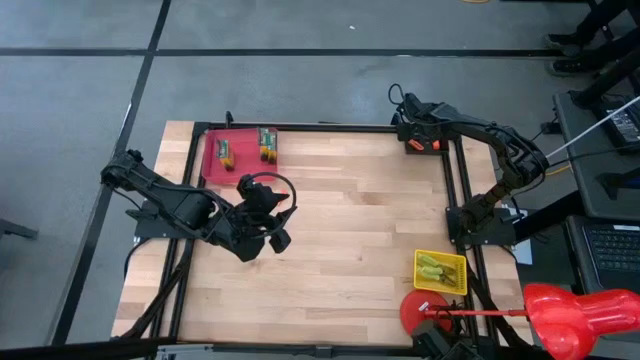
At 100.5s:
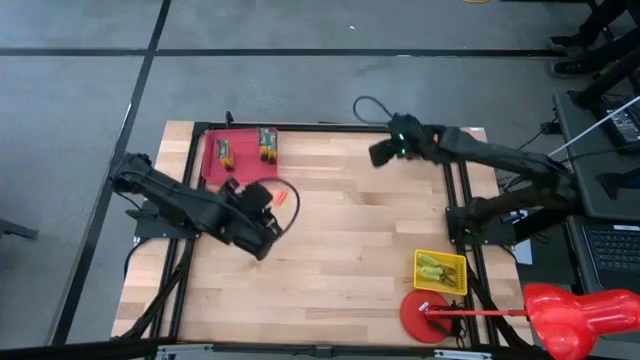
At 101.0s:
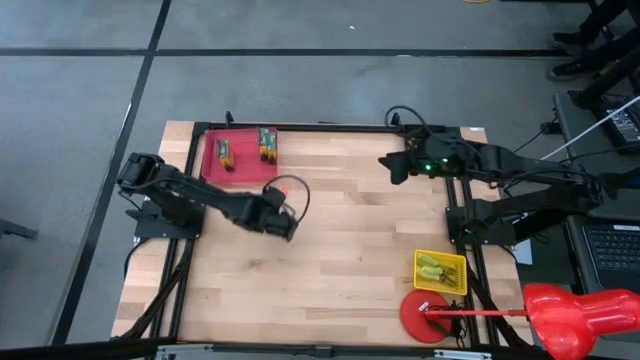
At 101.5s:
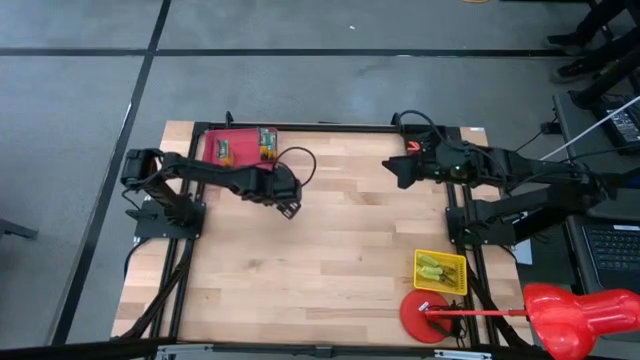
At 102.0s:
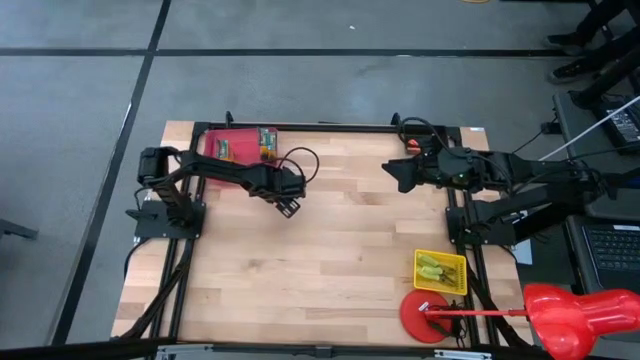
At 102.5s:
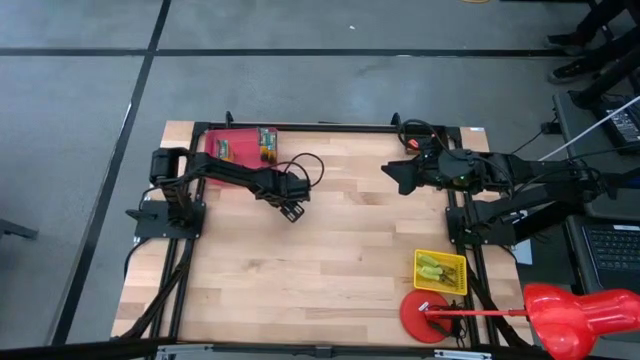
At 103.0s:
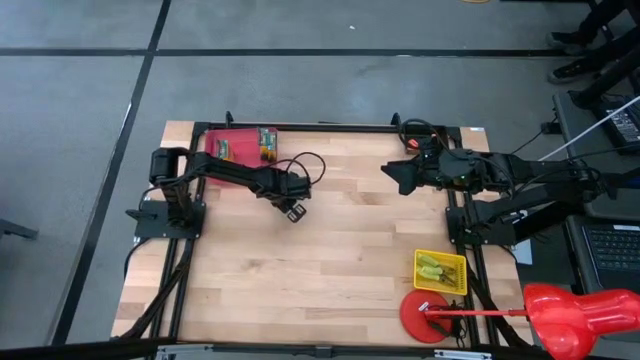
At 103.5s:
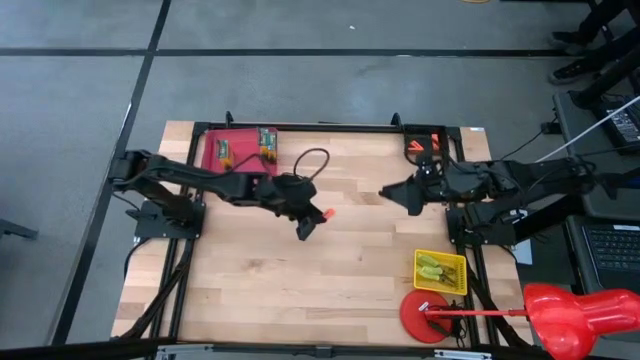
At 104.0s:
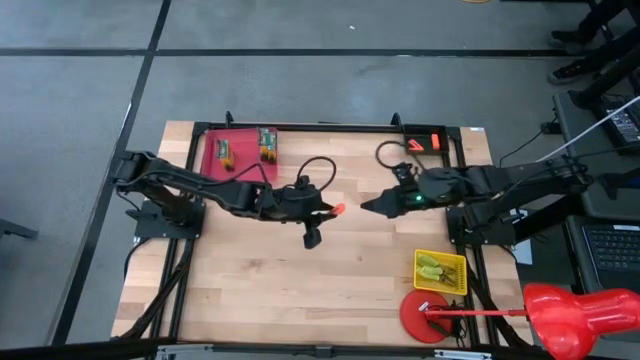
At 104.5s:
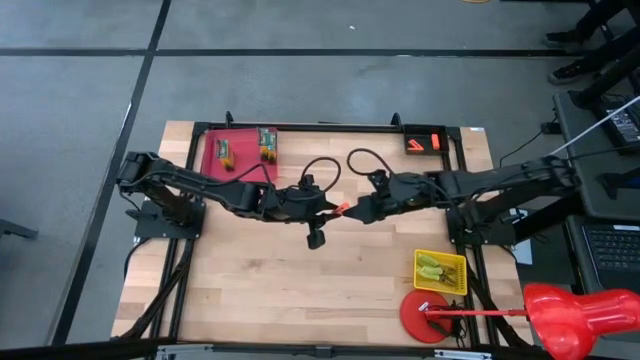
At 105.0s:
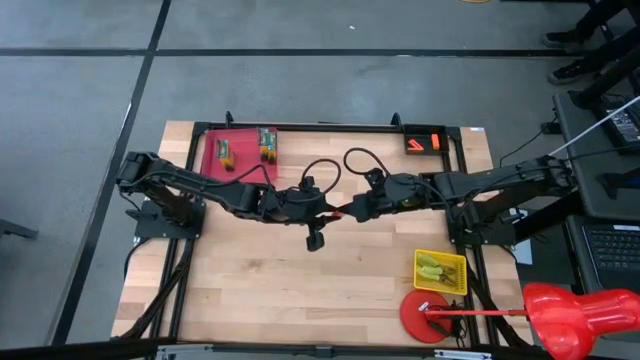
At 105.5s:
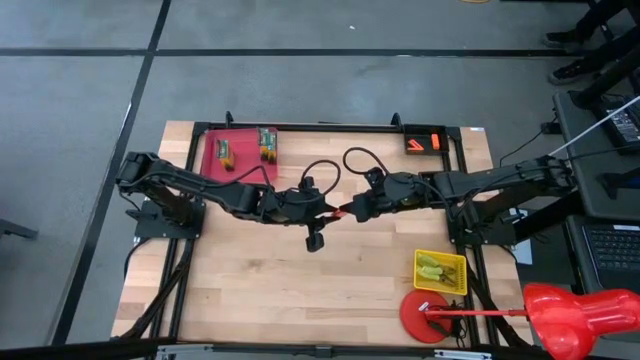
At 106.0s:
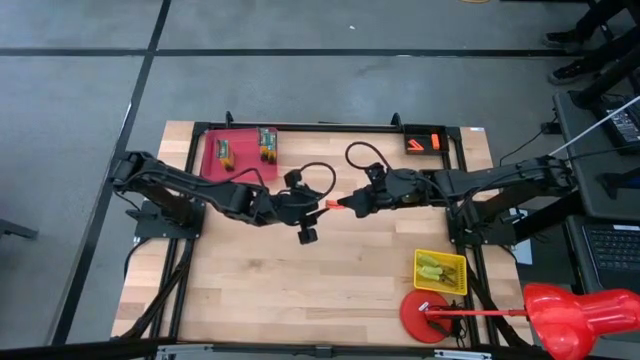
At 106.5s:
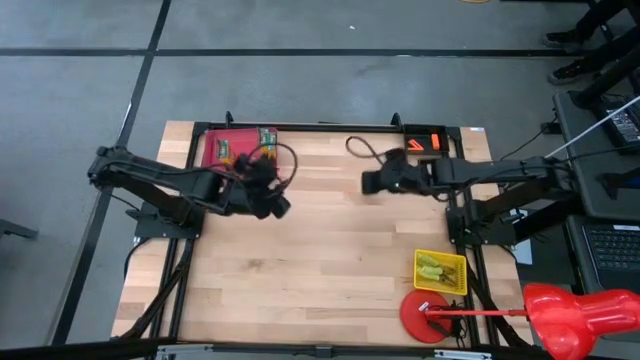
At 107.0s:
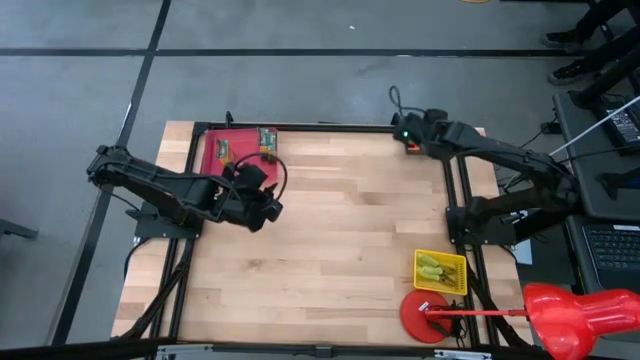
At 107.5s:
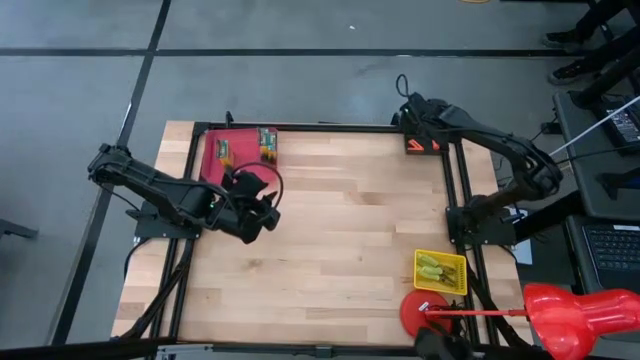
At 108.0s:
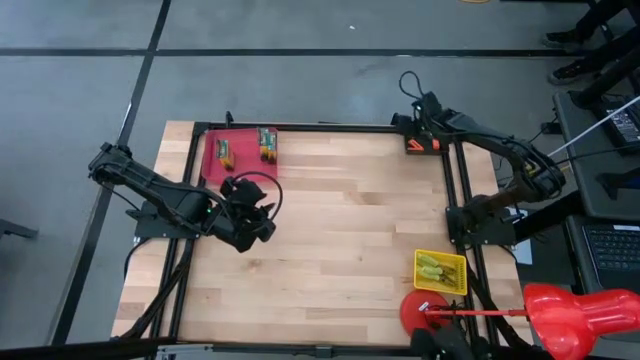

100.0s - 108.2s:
Task: Pick & Place School Supplies
Put the orange eraser into the black bin

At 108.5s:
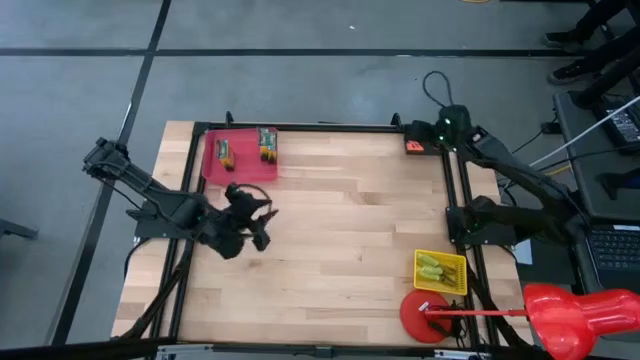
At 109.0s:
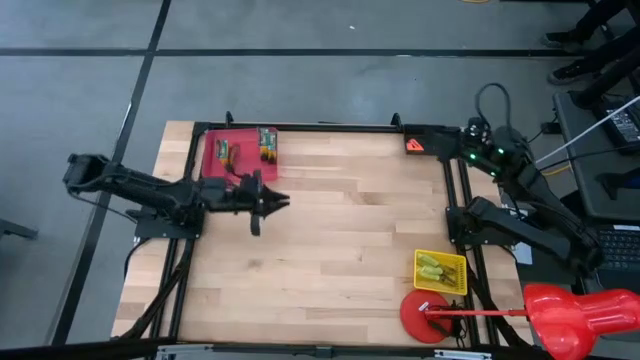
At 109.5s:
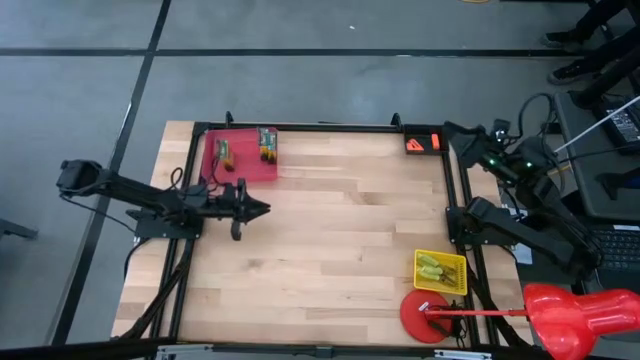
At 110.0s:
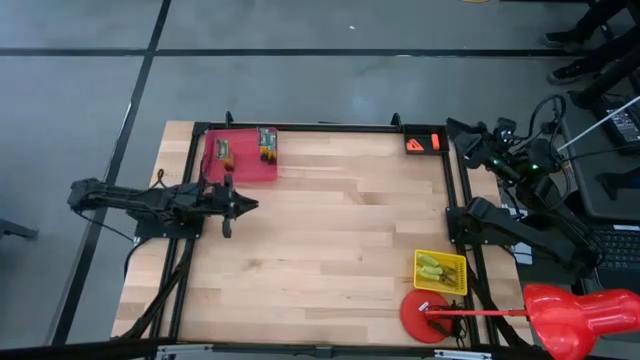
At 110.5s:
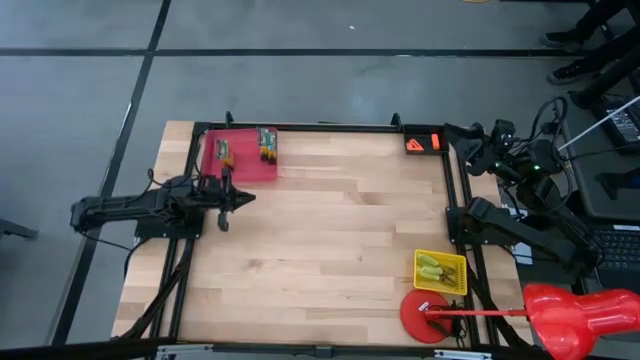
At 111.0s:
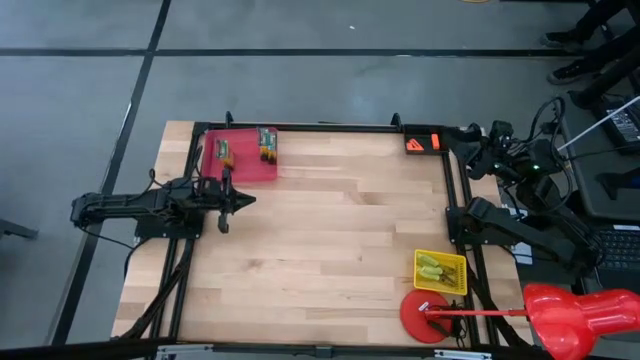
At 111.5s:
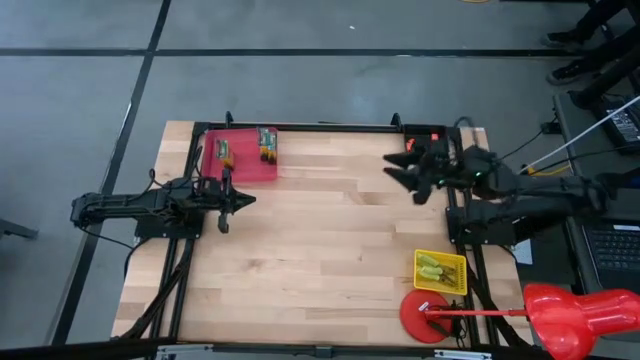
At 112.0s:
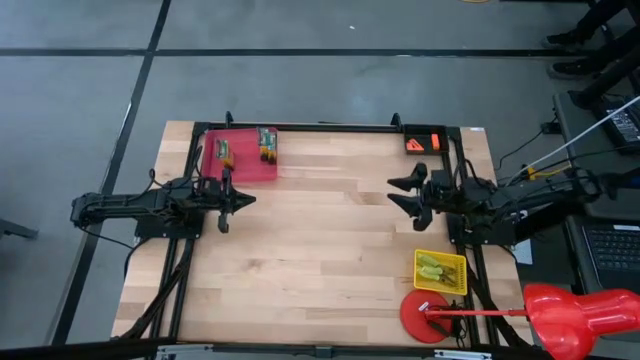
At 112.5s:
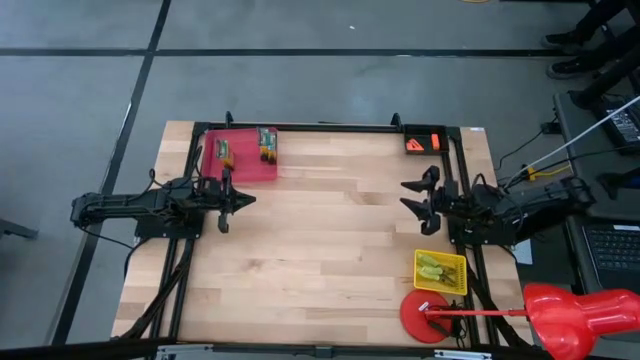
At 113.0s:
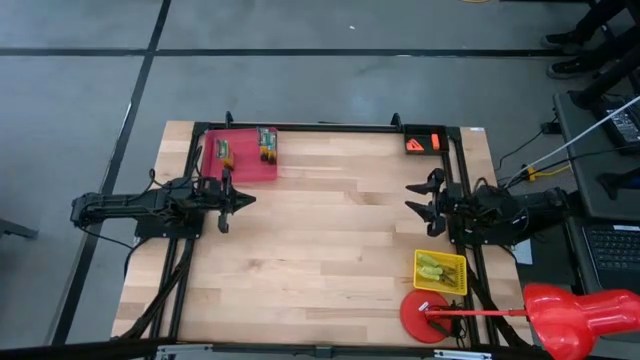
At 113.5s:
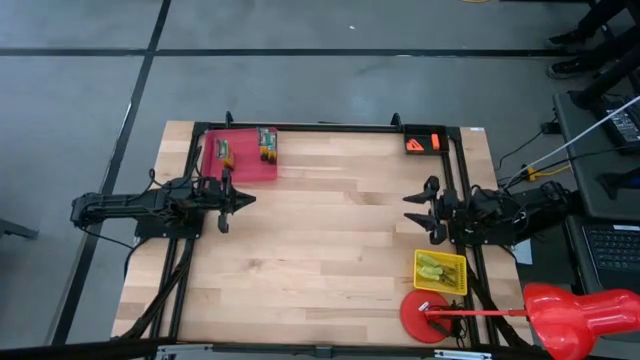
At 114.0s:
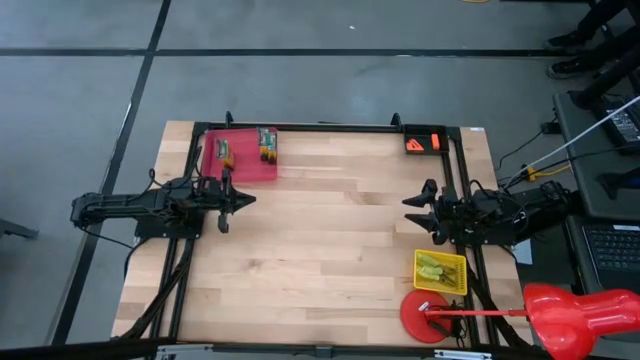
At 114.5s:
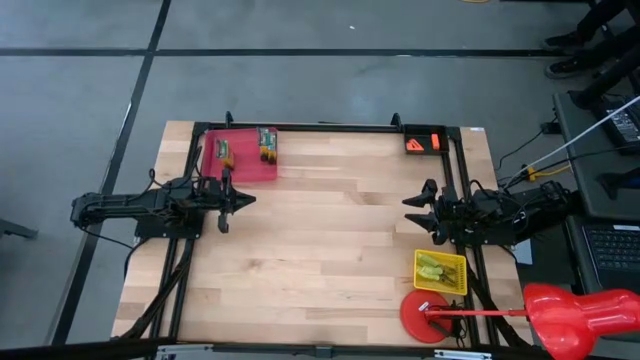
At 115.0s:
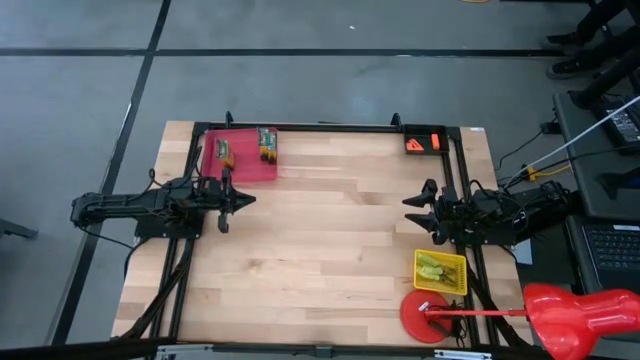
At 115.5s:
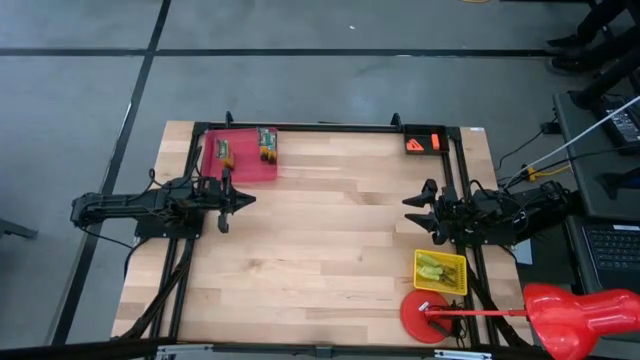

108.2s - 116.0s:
Return to Home Position

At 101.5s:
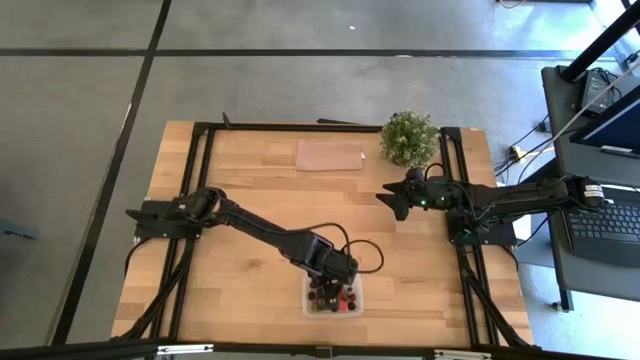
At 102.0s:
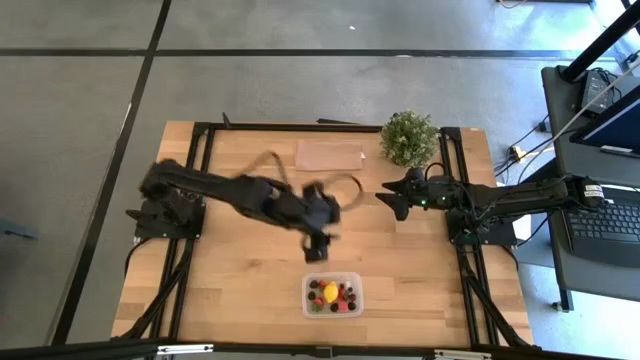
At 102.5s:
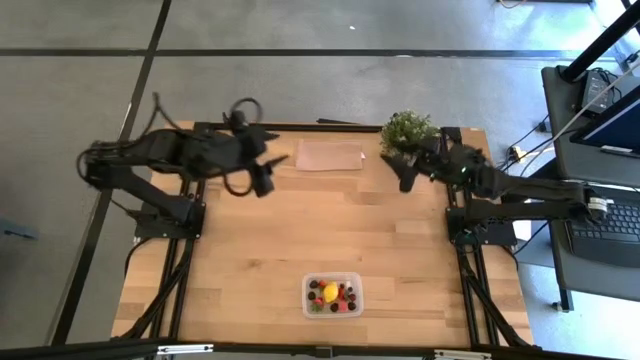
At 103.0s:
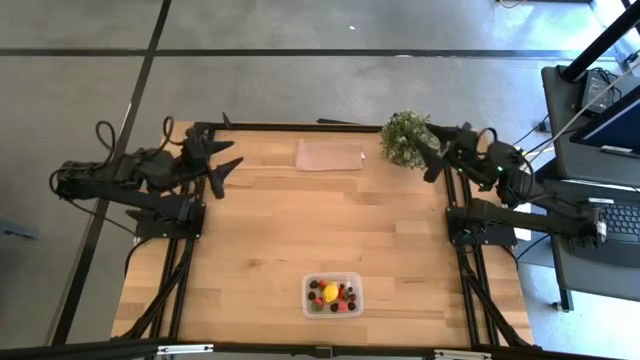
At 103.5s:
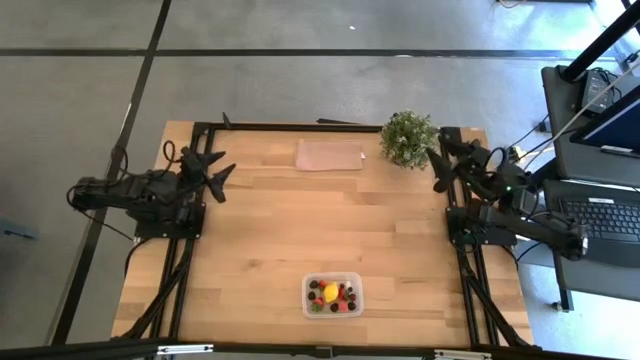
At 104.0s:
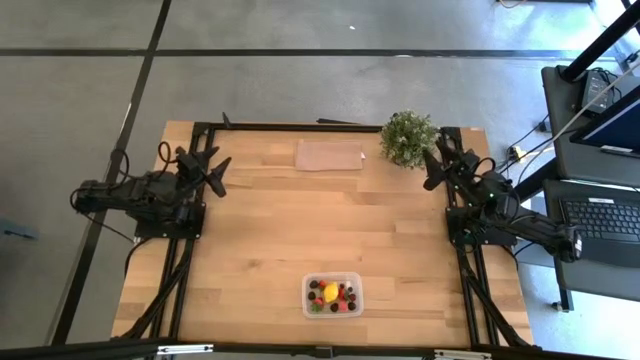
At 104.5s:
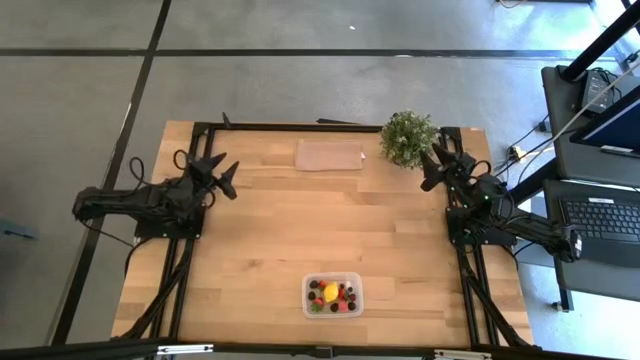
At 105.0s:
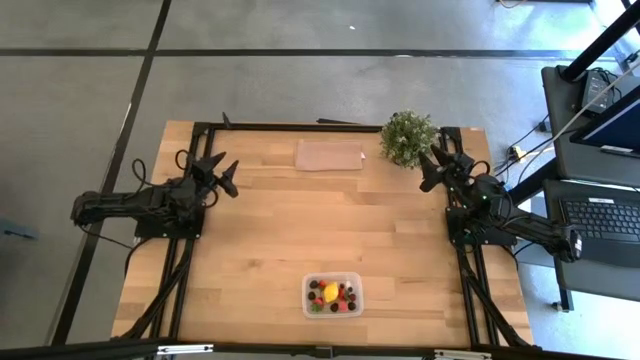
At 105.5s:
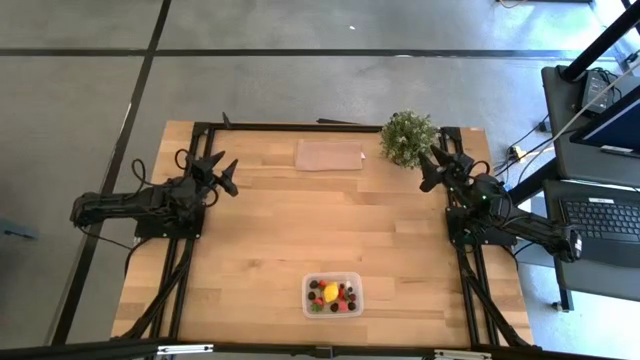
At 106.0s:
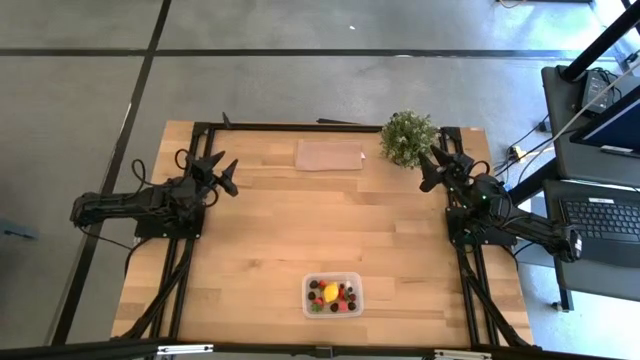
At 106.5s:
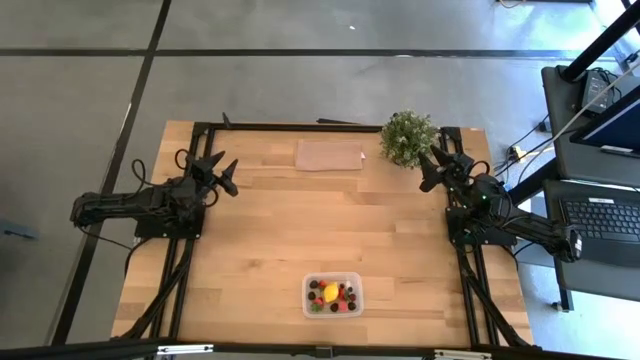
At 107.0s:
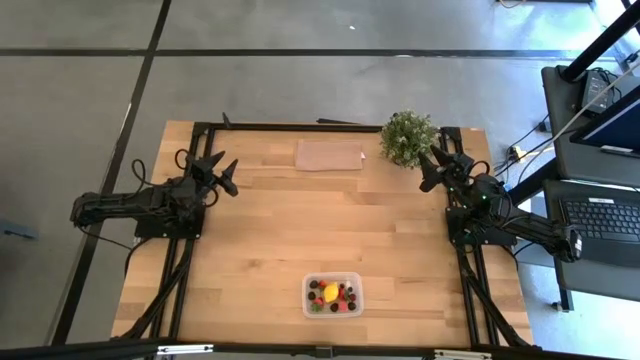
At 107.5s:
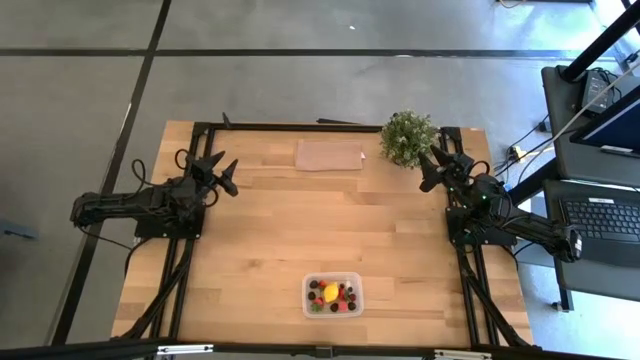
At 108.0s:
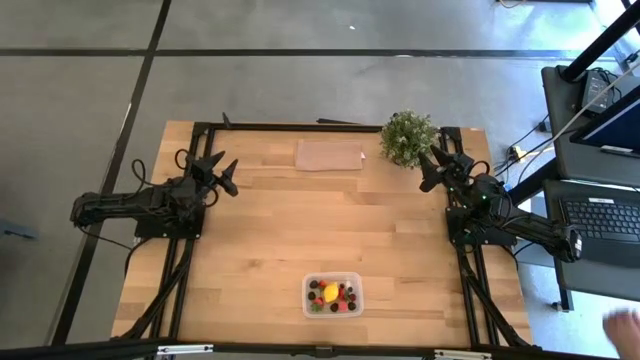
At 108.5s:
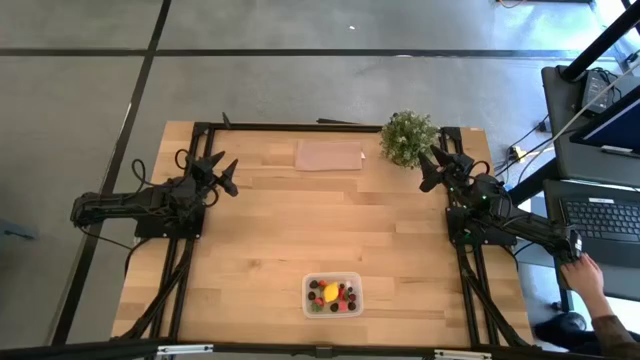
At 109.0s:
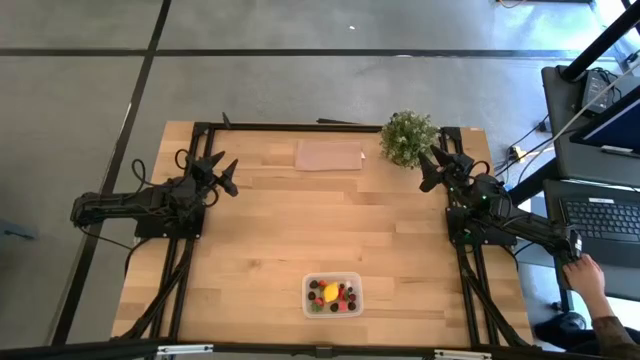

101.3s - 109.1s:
Task: Pick and placing Produce into tupperware
Return to Home Position
